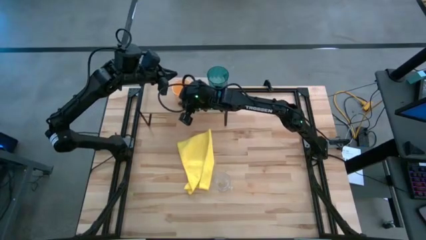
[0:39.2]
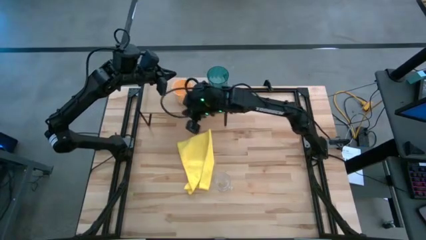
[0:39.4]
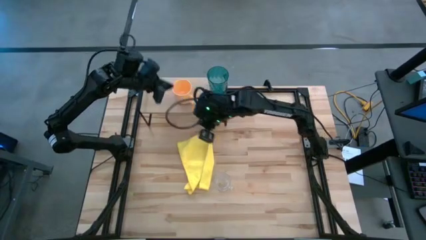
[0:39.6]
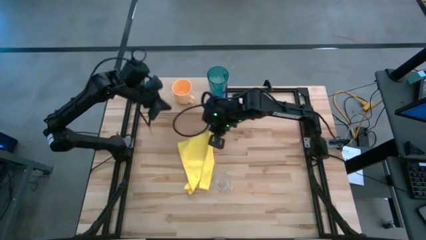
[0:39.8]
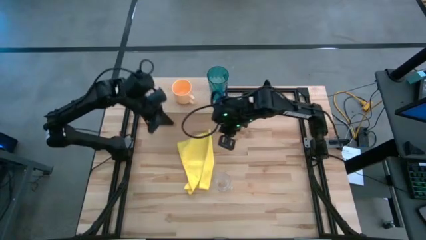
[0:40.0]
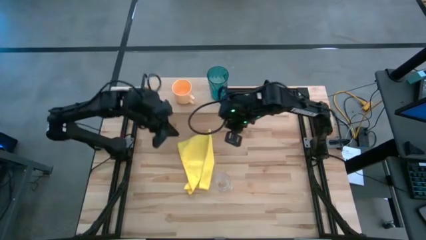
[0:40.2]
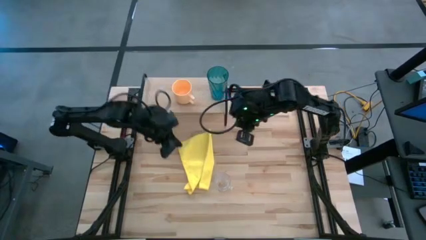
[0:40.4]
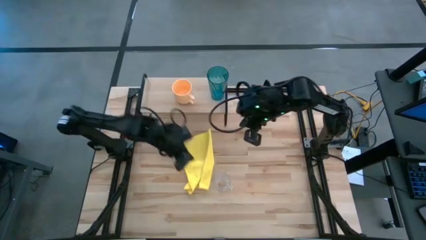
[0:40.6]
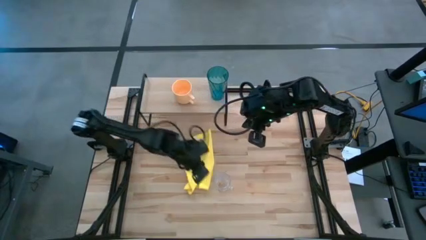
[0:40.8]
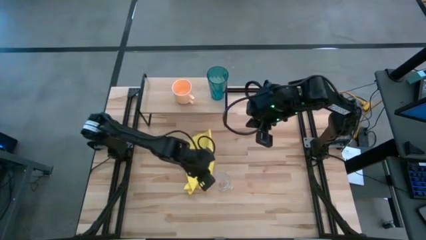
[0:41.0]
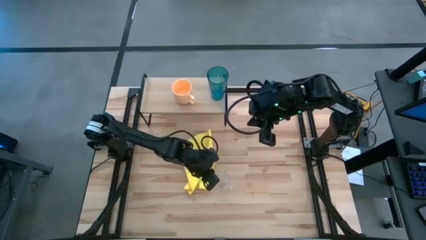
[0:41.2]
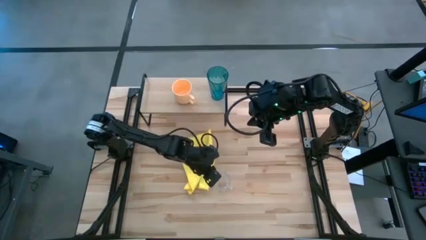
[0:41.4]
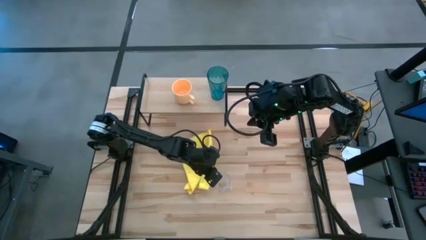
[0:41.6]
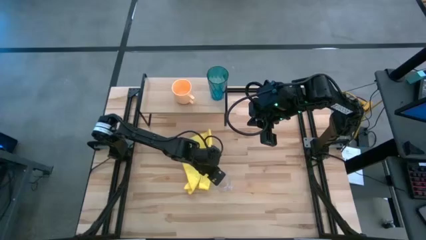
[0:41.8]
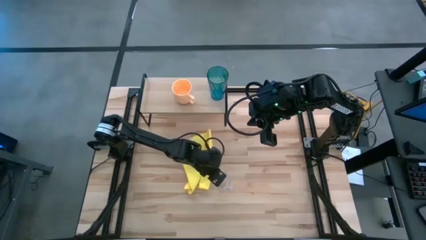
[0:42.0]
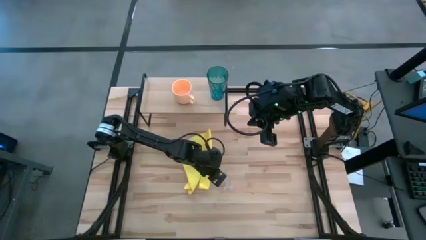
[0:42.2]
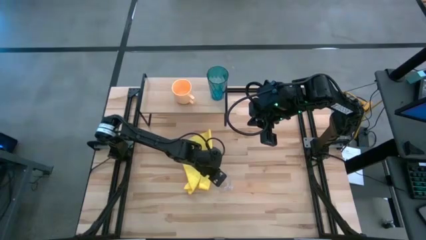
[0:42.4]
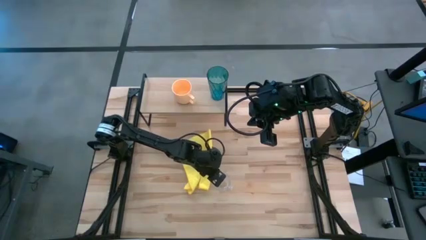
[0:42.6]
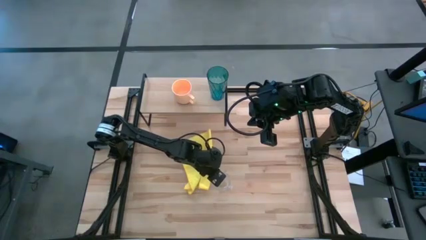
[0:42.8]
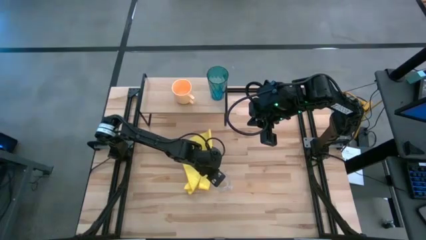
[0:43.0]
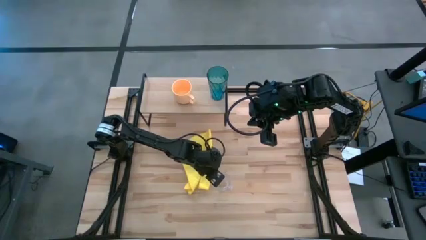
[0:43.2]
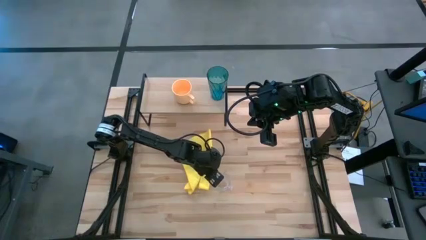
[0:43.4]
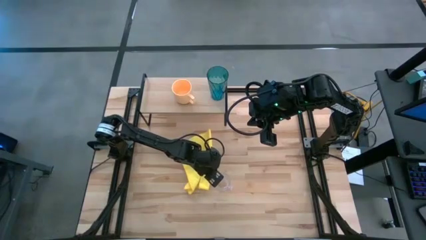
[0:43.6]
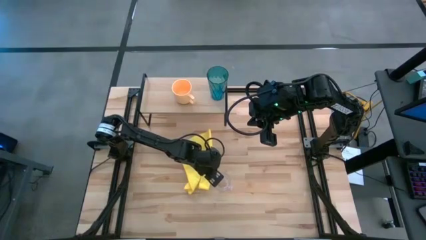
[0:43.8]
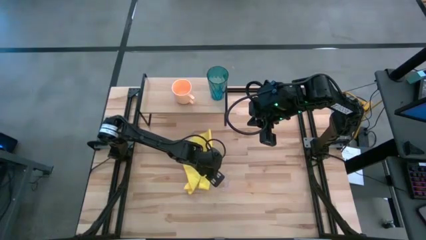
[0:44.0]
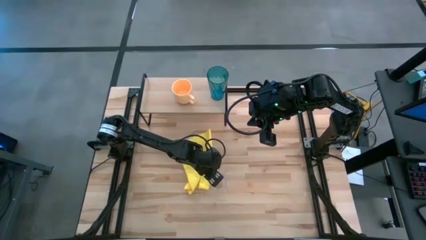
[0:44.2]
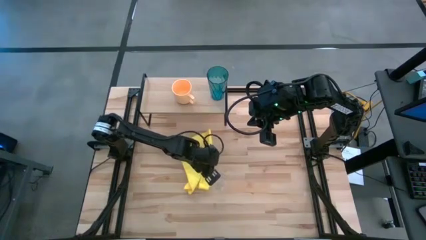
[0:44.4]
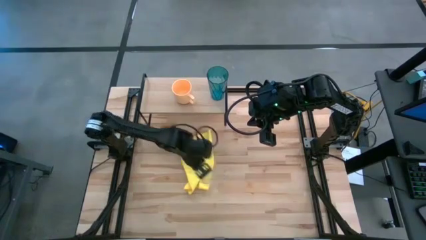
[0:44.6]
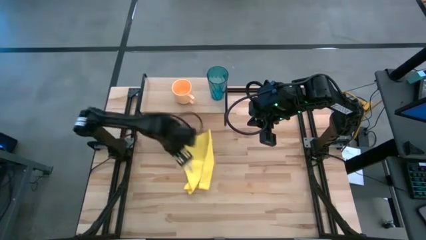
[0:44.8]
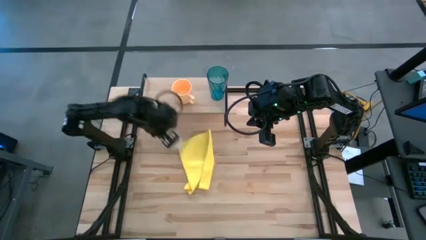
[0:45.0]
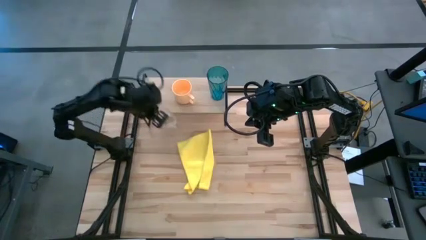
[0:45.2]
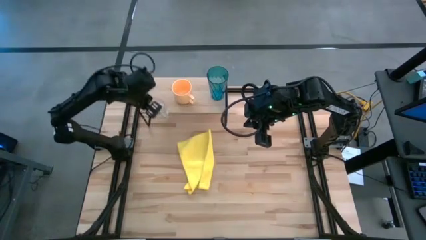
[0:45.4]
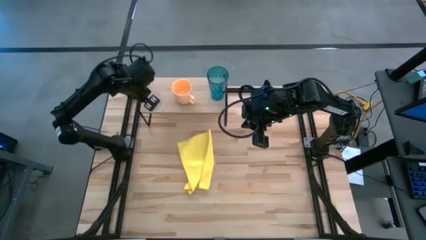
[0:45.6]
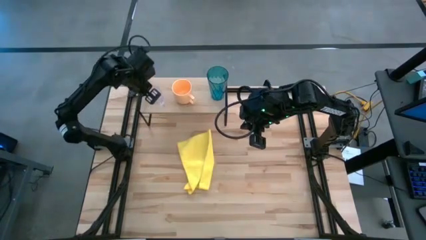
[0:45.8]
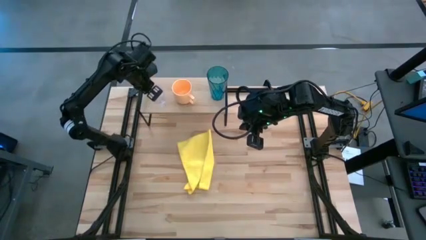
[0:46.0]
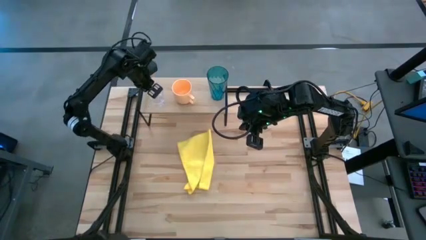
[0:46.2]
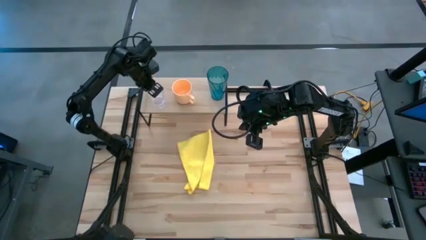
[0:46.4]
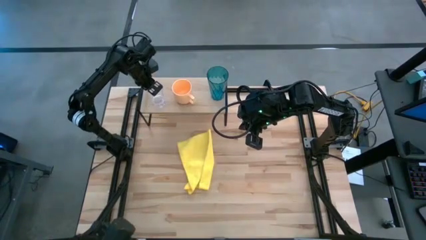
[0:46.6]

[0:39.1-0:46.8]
Task: Stack small to large cups/mugs on shelf
Put the transparent mug on the shelf

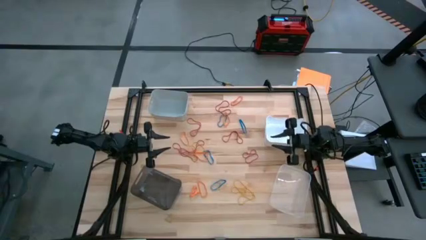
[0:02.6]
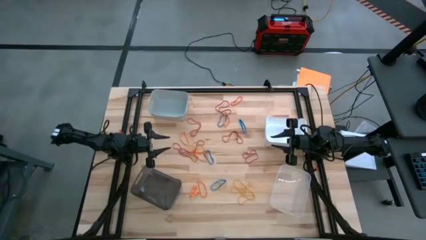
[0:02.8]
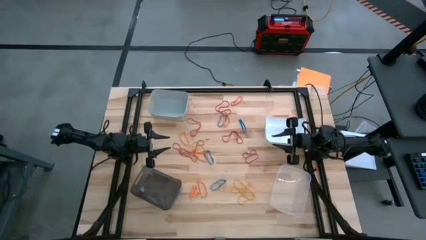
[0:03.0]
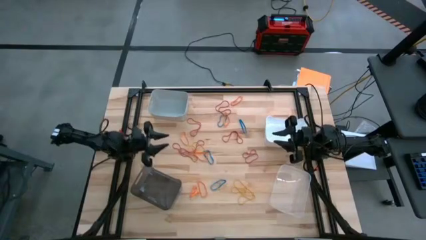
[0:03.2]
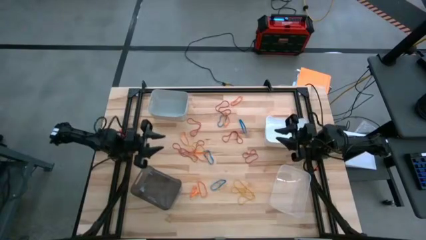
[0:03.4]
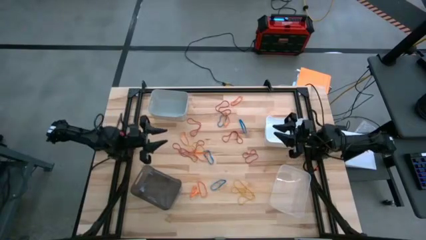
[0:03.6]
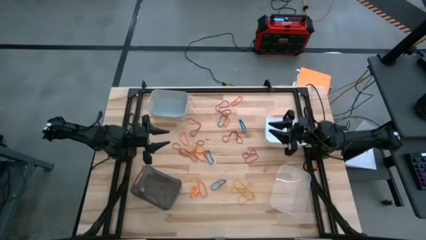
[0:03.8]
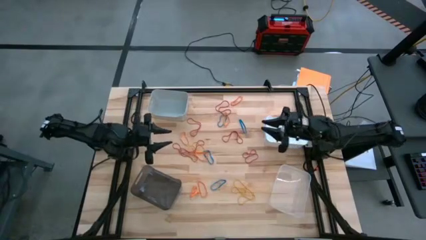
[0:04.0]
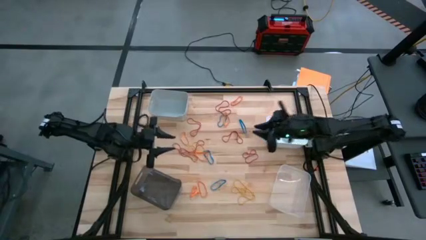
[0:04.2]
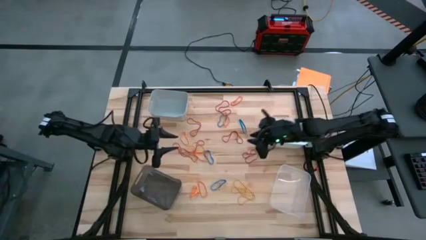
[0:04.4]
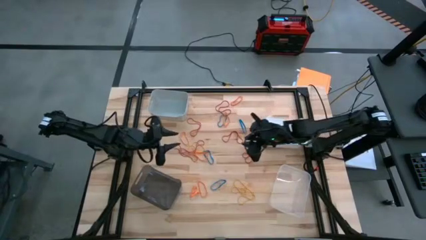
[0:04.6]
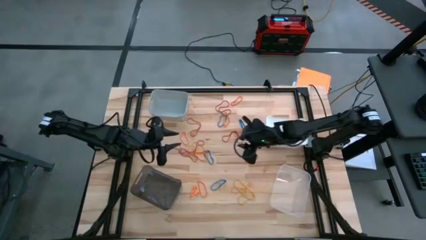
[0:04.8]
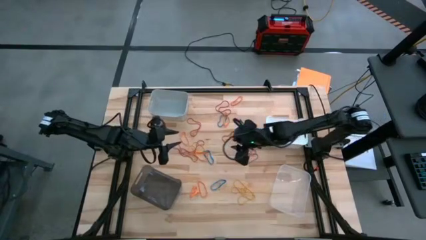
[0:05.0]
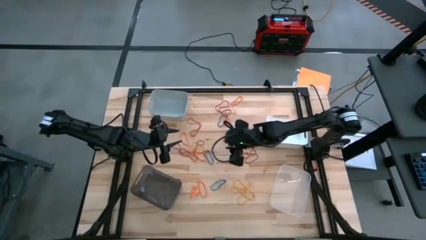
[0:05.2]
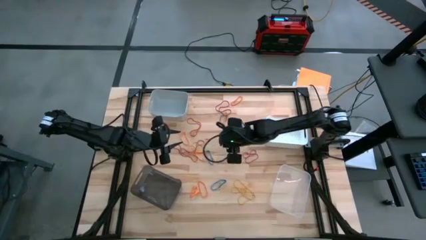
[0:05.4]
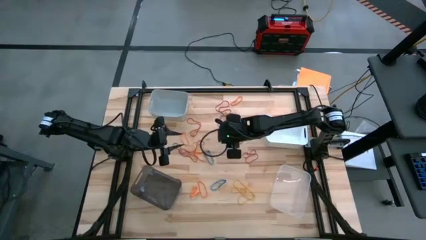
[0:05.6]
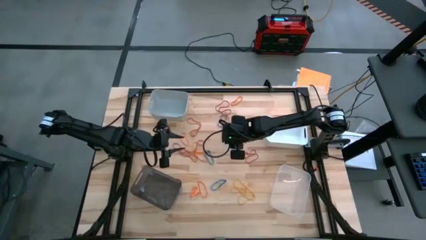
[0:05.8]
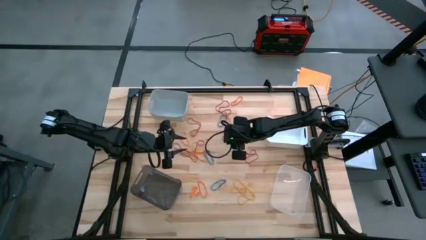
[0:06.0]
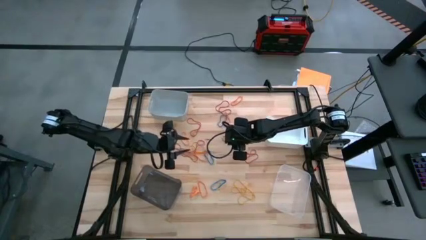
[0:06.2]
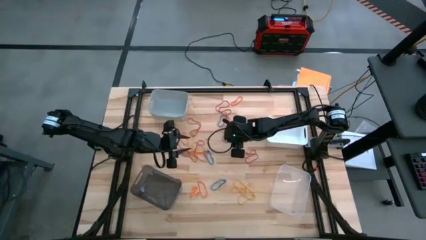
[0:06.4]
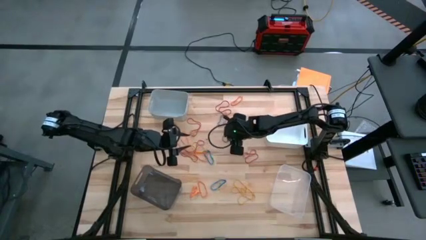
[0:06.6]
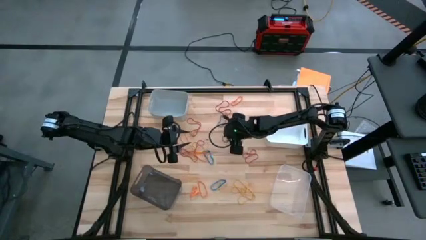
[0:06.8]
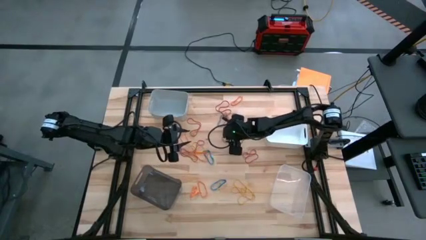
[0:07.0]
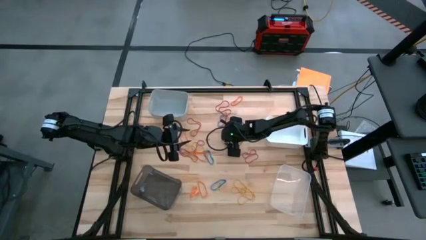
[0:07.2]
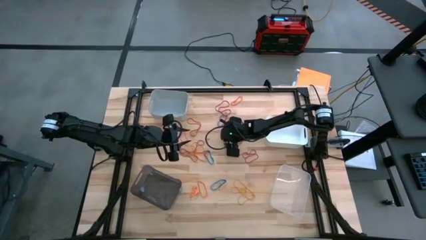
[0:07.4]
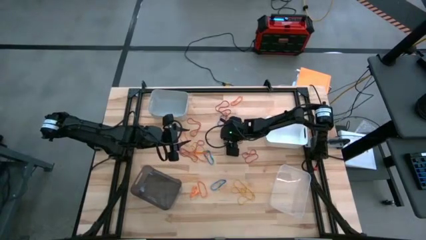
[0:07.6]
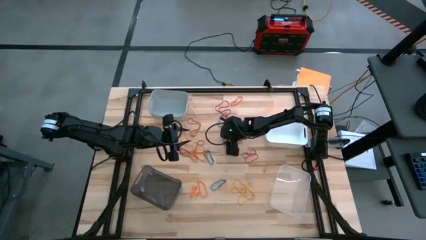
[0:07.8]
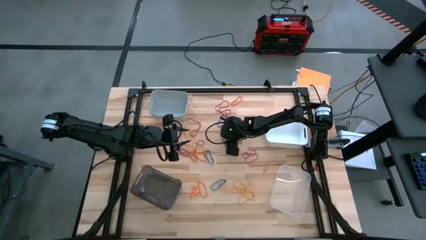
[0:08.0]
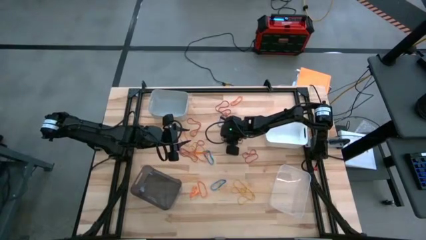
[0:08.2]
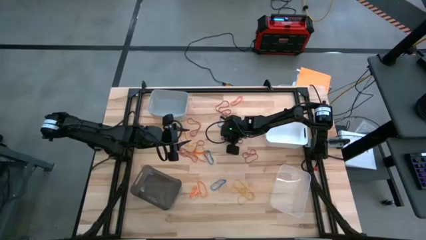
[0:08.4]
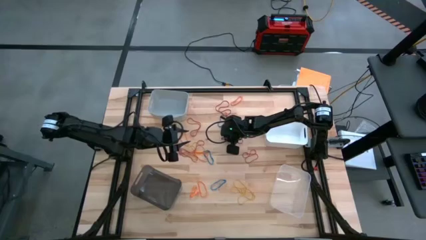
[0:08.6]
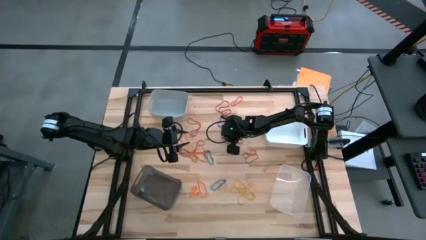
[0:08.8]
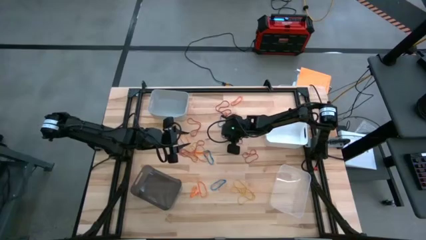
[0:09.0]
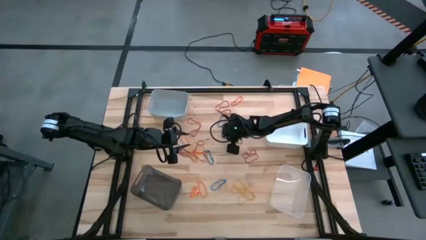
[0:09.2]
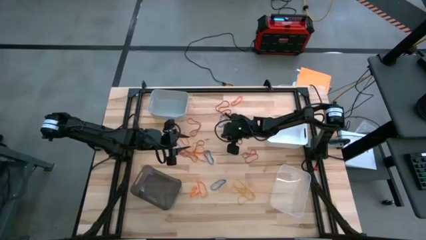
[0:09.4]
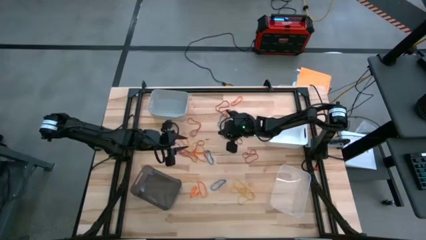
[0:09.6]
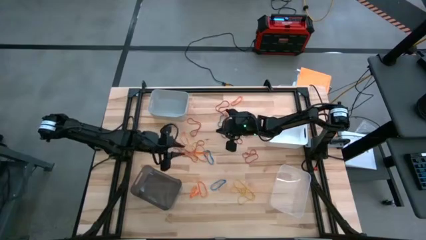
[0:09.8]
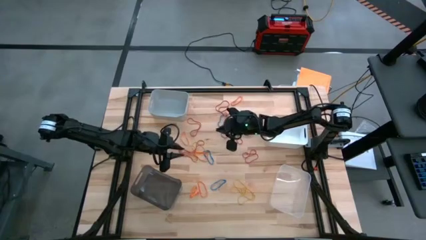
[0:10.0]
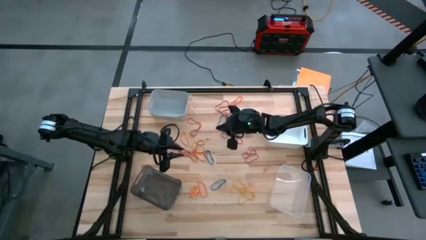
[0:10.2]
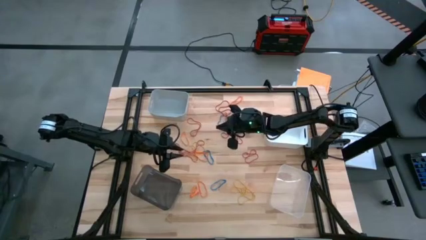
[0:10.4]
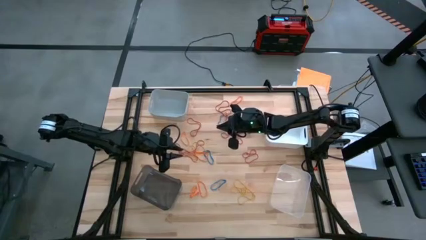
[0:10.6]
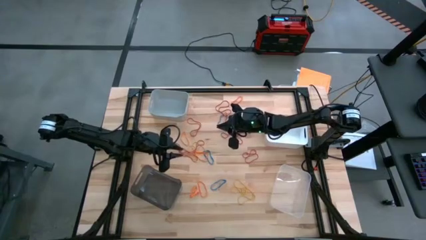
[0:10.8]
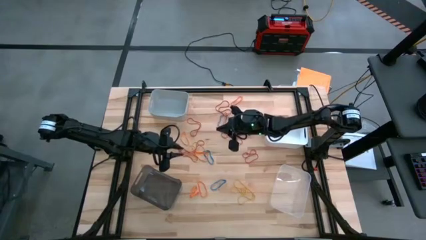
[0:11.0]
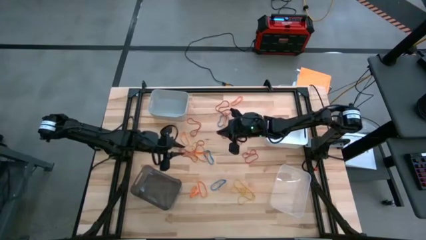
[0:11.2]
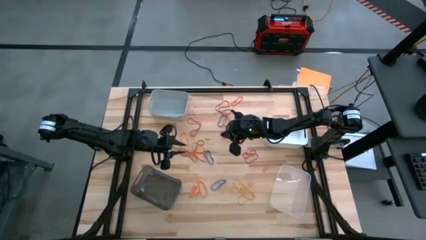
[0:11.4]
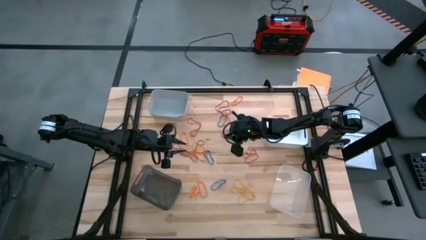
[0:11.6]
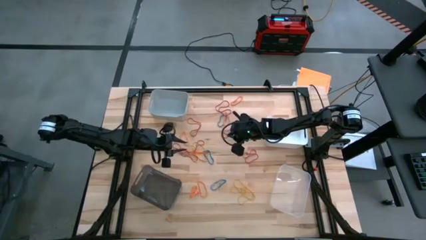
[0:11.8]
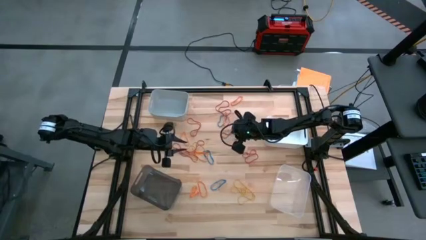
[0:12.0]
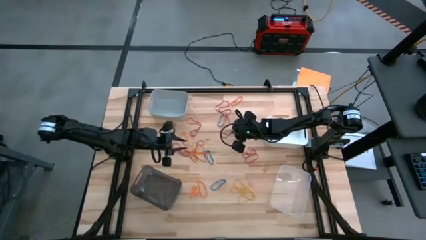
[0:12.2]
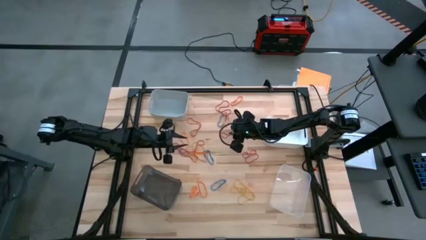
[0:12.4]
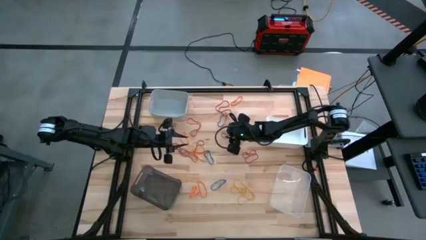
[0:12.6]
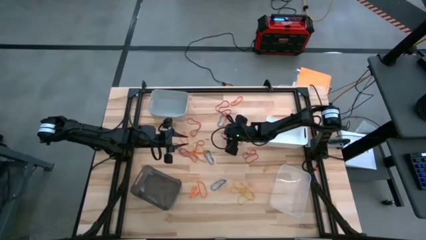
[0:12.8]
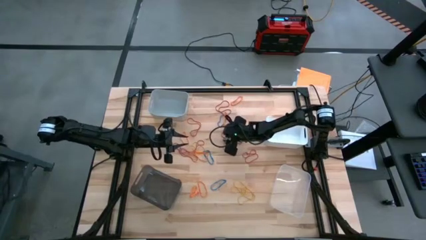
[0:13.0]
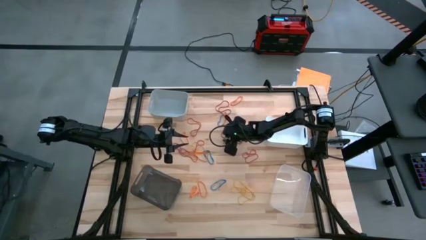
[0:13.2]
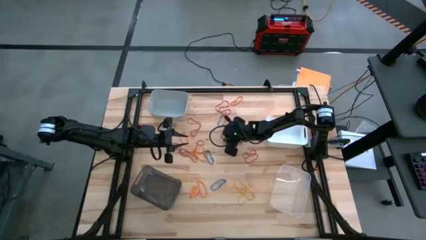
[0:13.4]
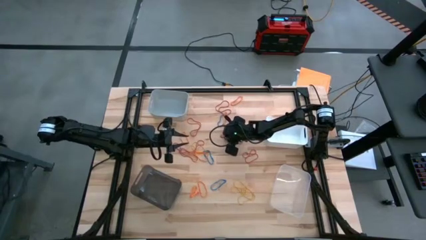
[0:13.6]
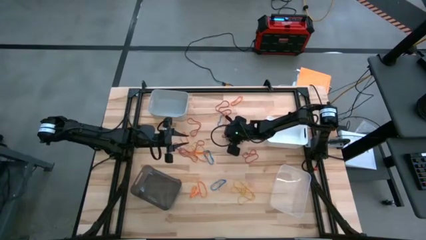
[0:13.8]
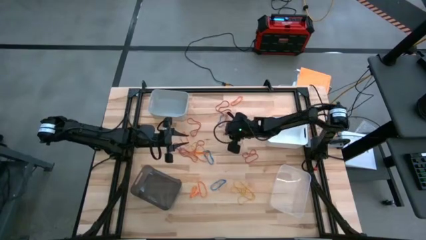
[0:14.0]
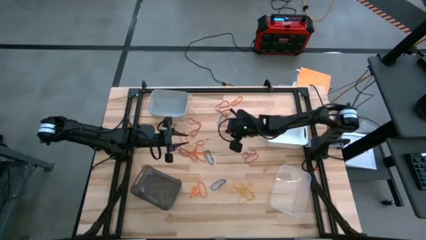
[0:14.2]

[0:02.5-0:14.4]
Task: Sort rubber bands into baskets
Put the red rubber band into the white bin
